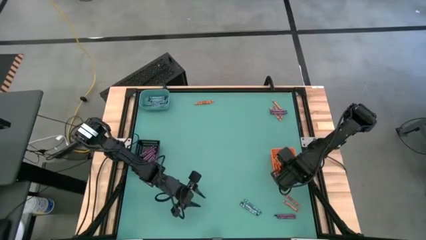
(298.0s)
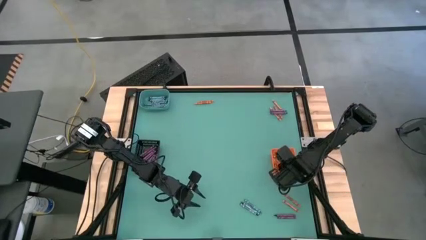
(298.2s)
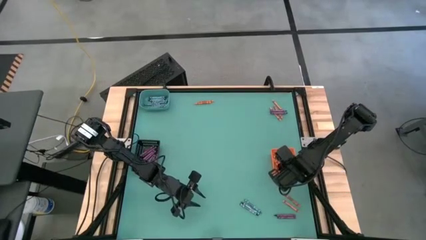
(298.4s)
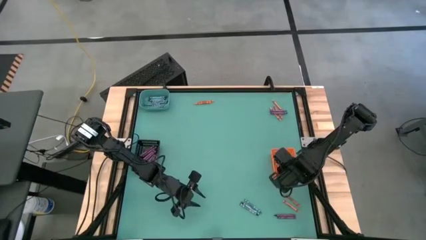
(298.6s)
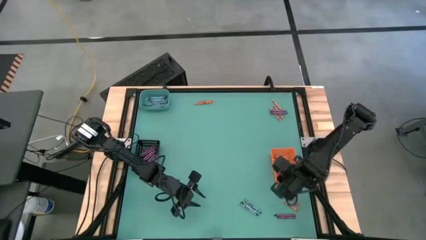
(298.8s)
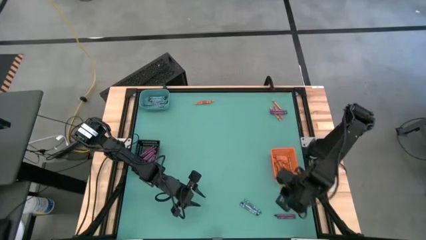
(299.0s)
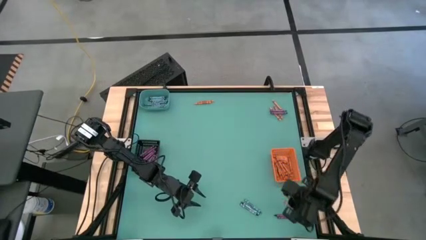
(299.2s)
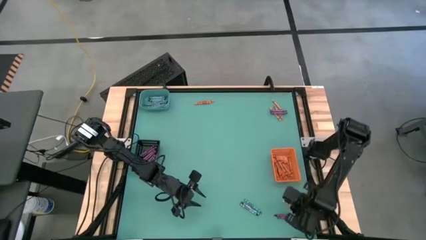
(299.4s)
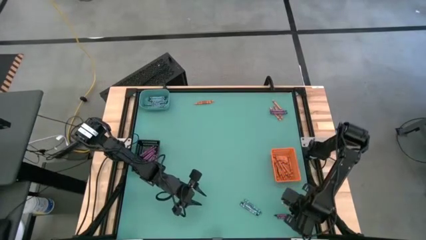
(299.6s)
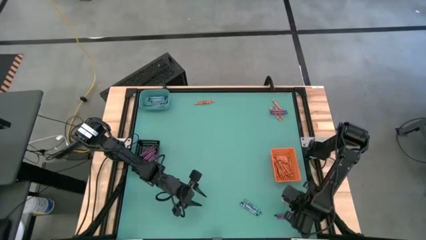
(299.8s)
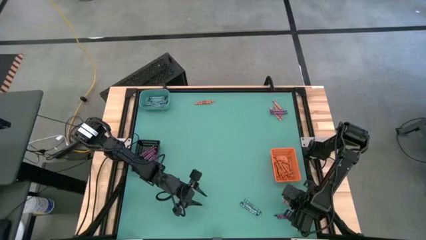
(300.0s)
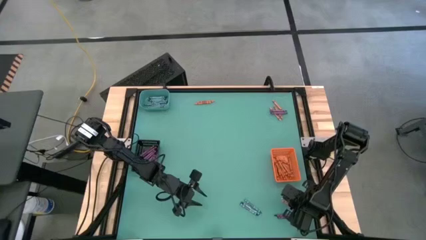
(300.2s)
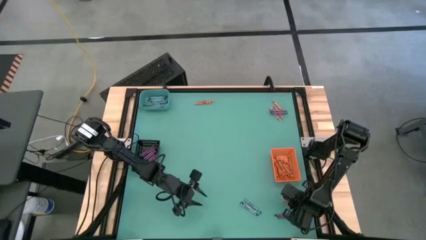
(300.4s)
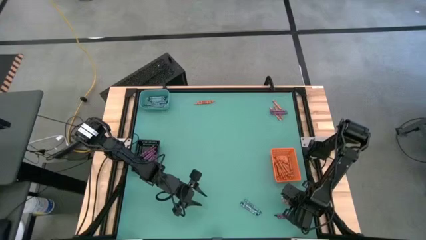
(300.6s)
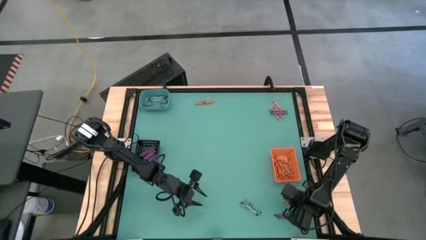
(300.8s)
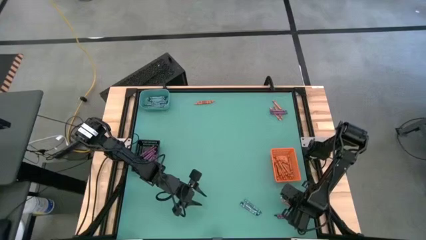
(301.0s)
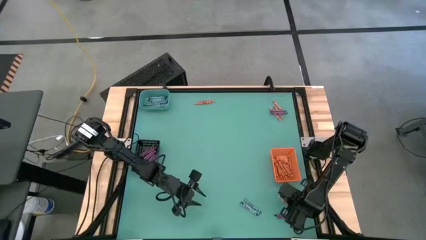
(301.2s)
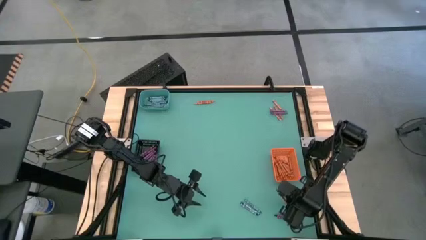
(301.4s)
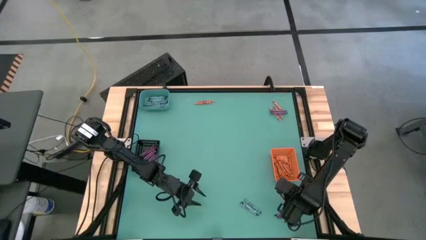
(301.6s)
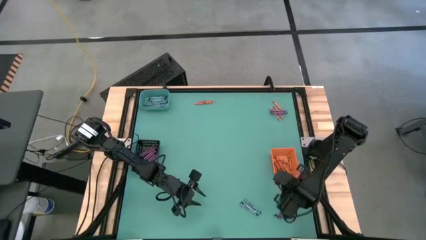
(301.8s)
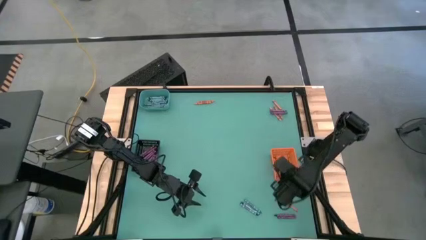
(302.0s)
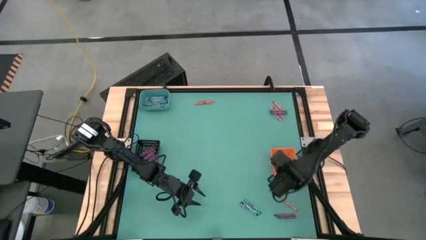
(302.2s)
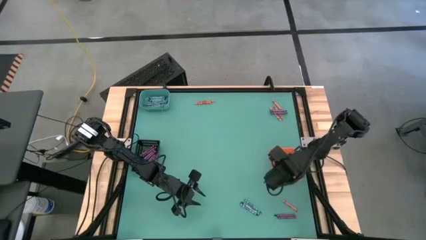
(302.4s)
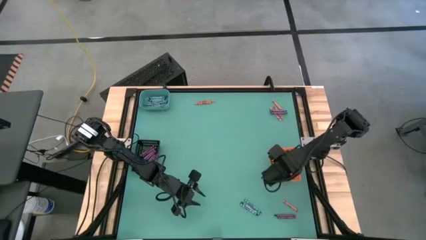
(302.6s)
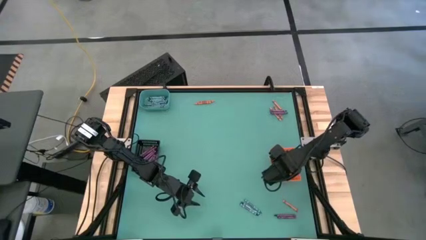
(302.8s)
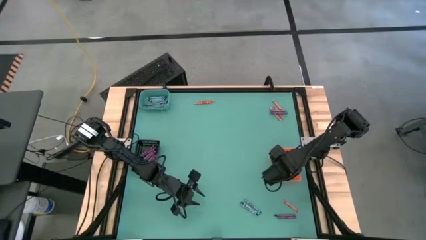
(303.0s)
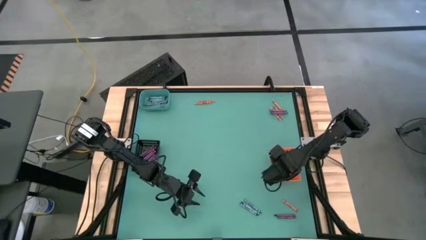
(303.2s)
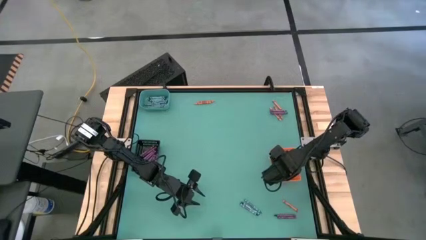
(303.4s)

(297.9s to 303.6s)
Task: Sort crayons
Put the orange crayon into the orange bin

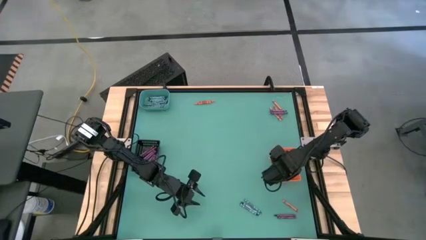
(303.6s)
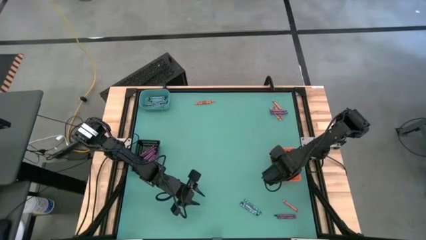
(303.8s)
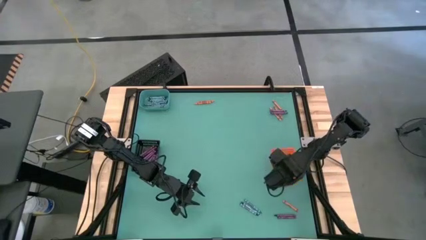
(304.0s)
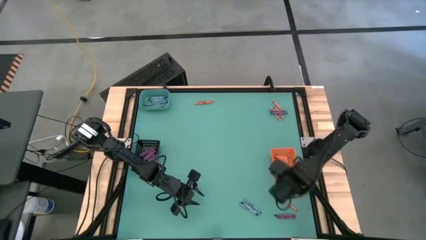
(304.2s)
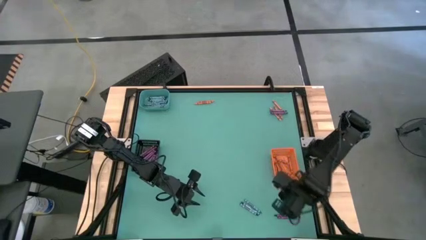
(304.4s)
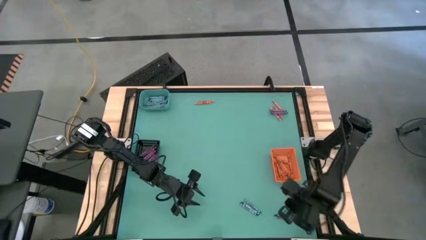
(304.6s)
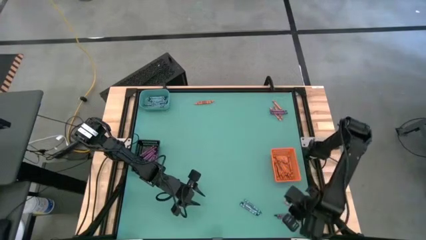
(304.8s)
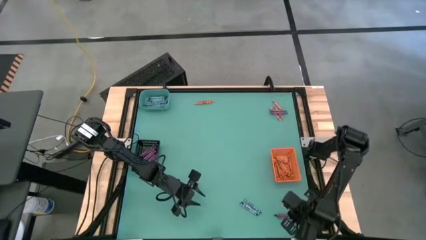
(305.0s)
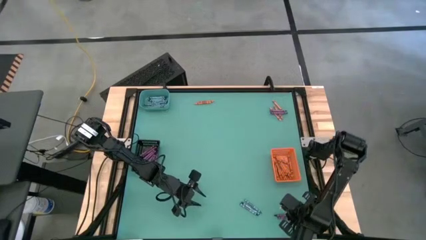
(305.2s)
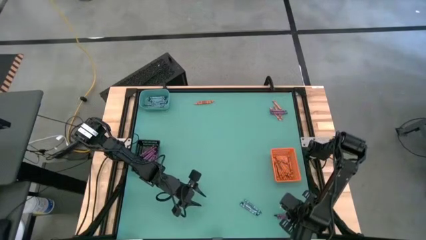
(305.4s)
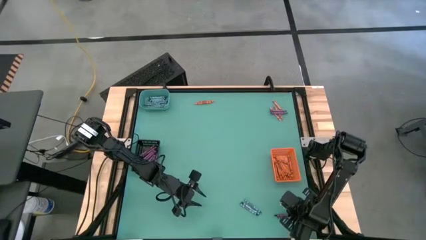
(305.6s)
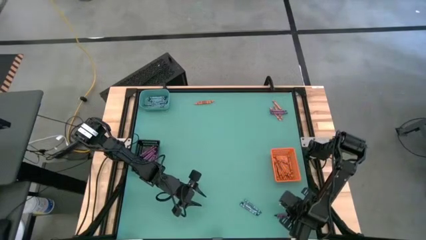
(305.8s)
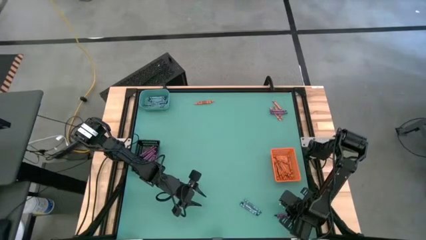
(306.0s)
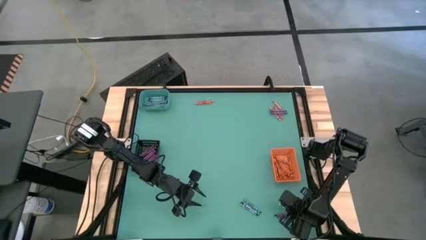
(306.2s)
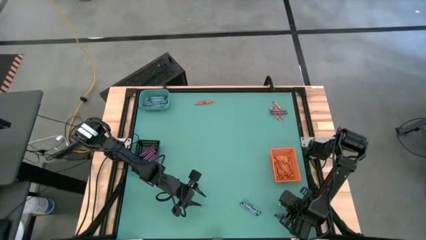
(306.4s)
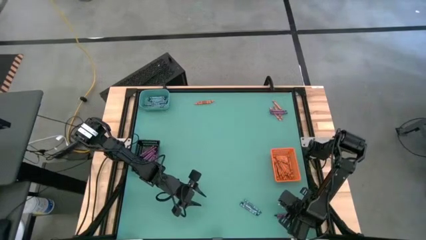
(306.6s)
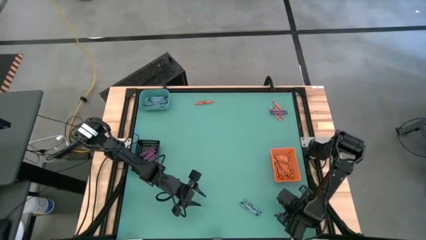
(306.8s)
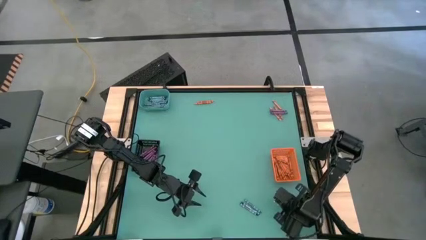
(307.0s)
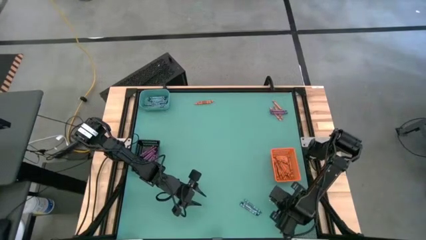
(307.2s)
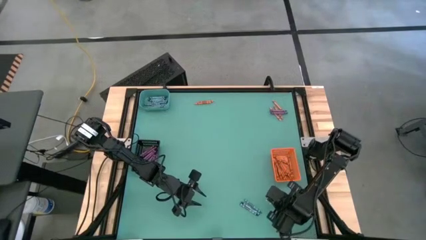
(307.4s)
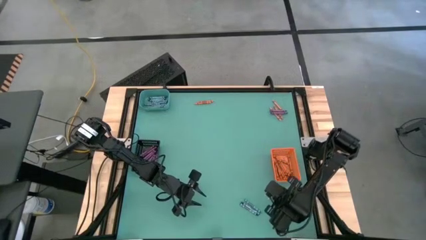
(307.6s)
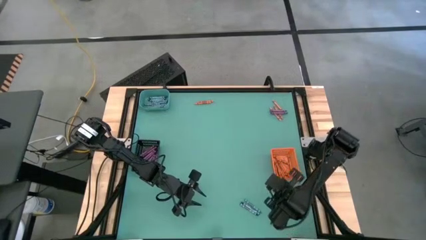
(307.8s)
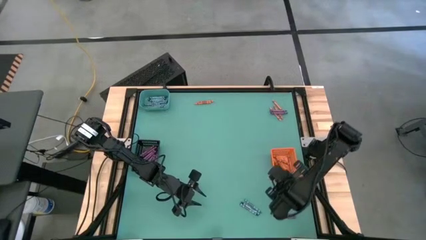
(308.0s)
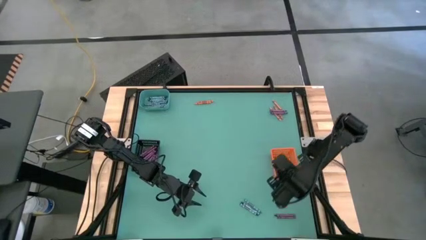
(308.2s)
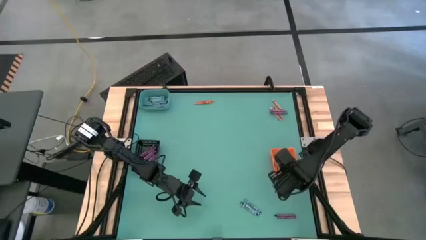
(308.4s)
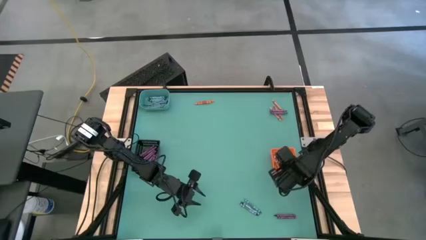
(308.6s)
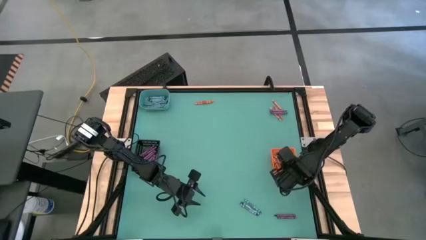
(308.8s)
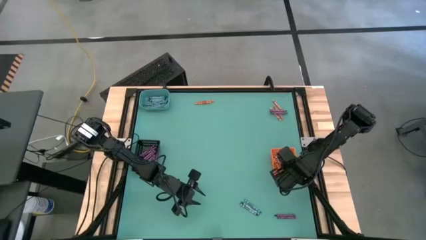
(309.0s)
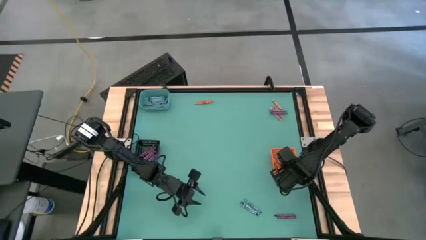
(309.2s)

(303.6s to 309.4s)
Put the orange crayon into the orange bin

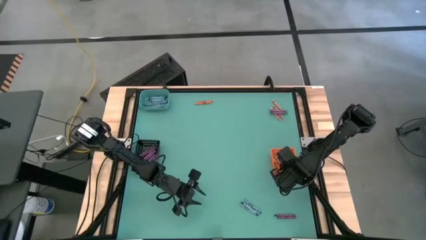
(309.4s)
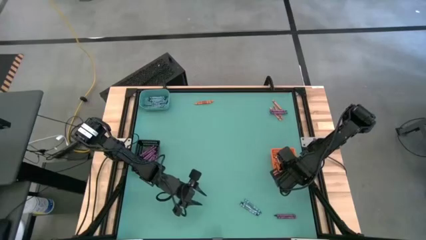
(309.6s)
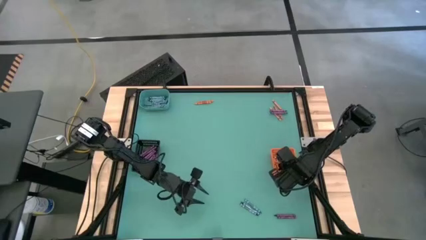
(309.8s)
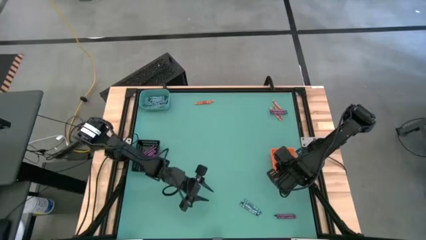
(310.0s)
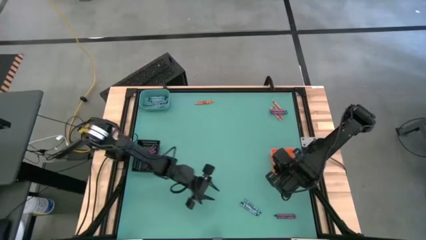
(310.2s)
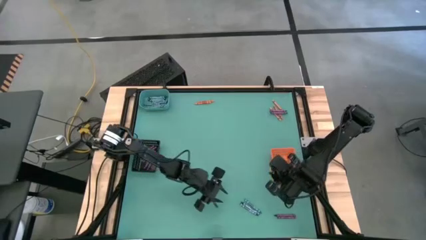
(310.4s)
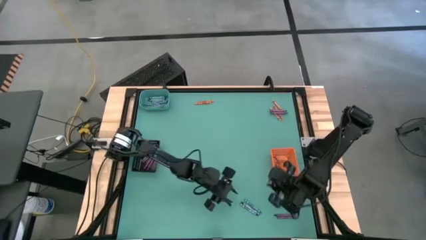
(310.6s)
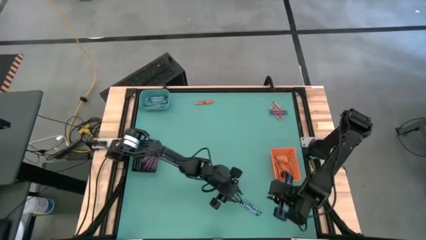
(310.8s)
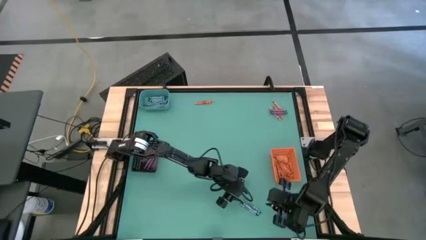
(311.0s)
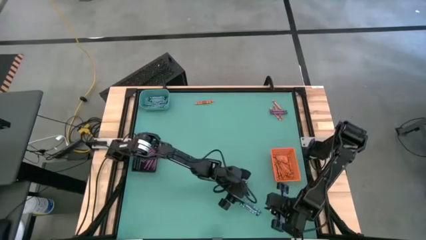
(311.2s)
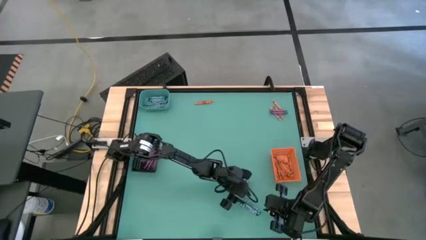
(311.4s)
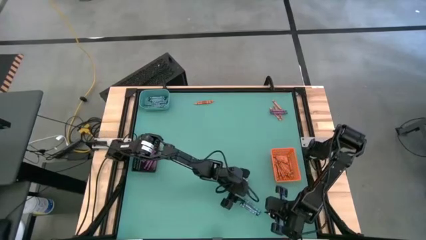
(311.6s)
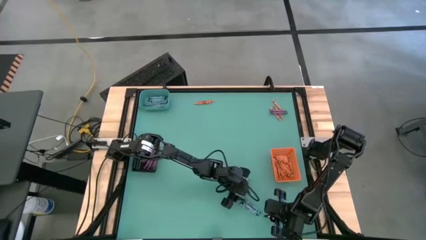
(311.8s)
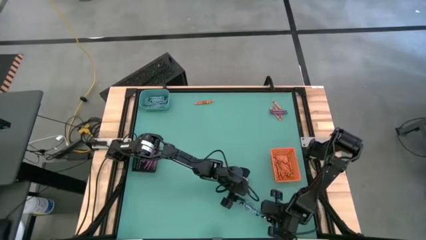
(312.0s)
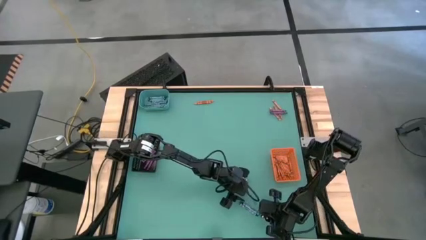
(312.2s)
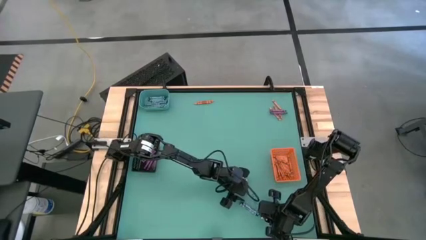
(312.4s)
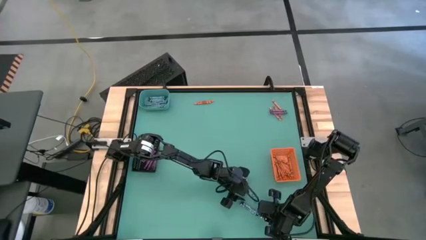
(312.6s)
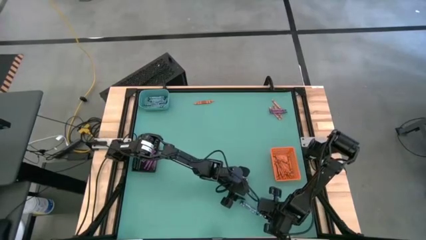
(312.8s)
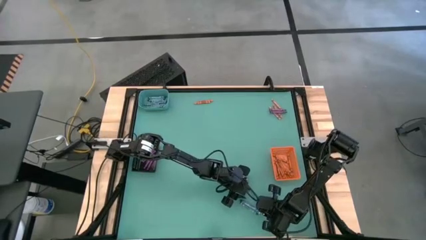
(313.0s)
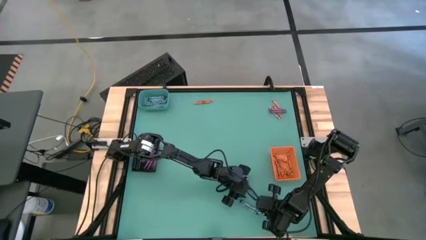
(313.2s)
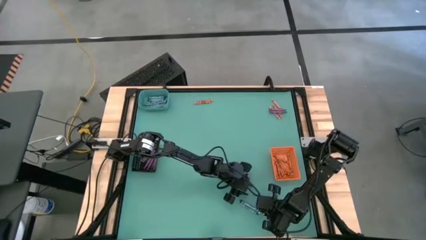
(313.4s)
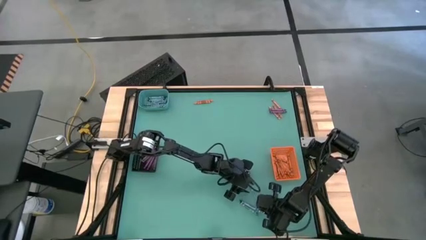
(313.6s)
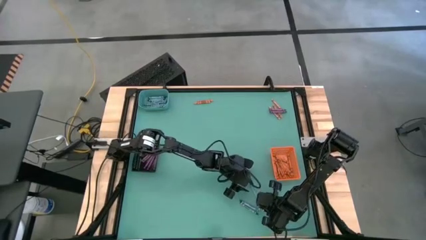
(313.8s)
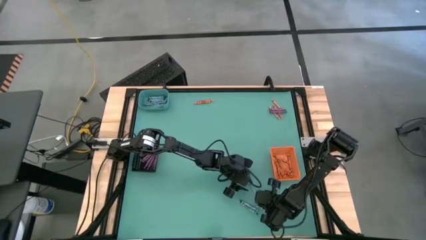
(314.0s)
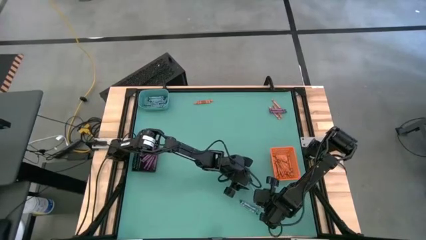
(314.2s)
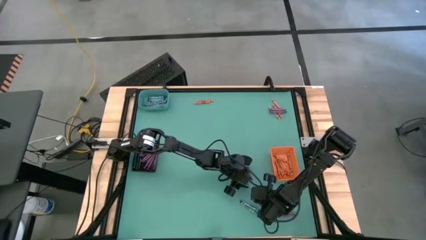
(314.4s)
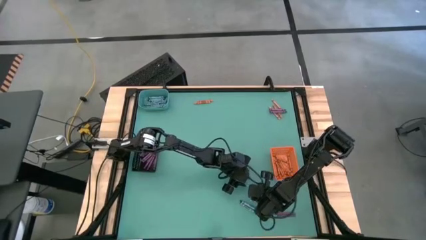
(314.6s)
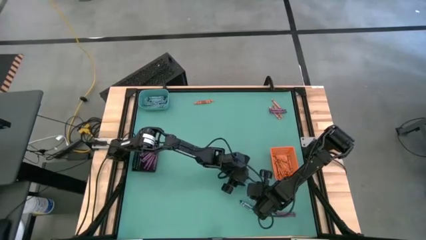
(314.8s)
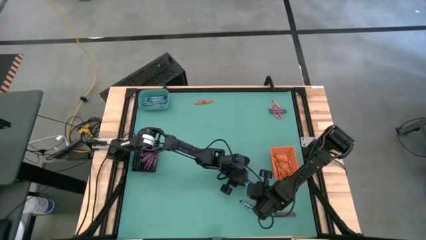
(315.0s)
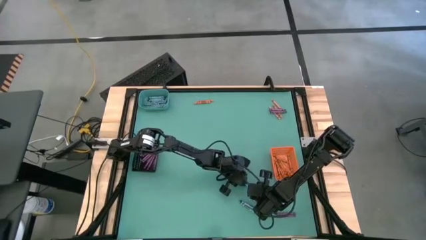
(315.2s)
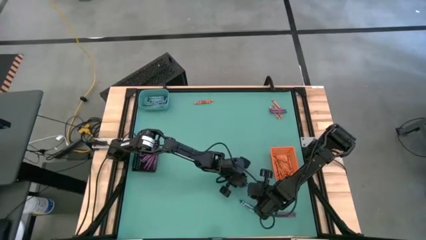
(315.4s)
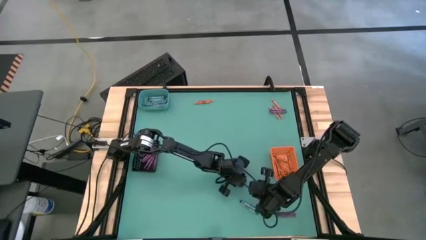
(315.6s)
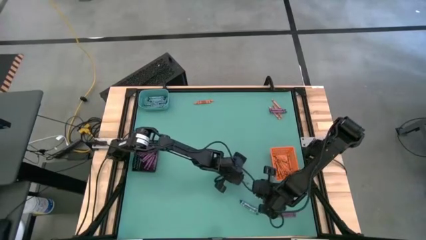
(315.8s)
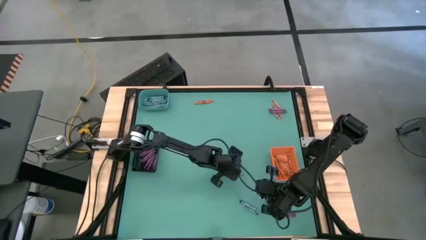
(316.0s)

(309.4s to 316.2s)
Put the green crayon into the green bin
